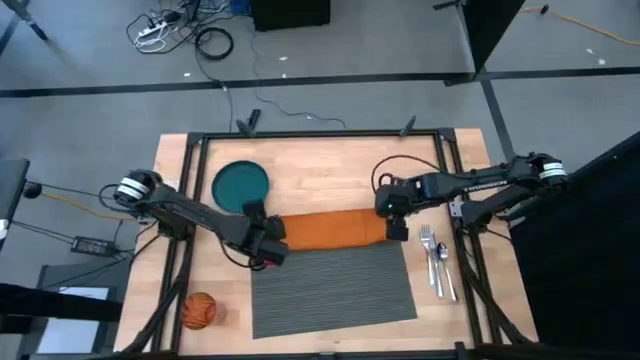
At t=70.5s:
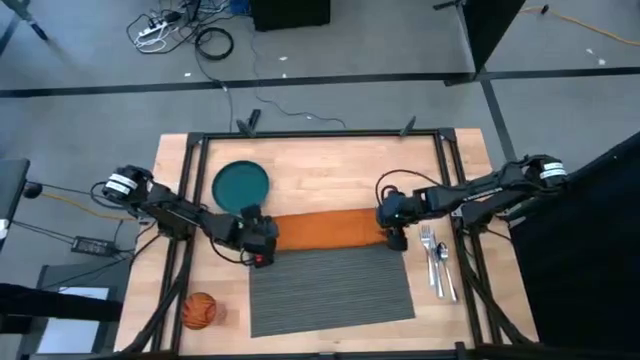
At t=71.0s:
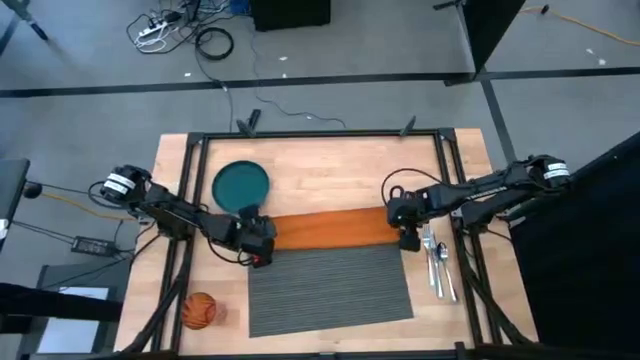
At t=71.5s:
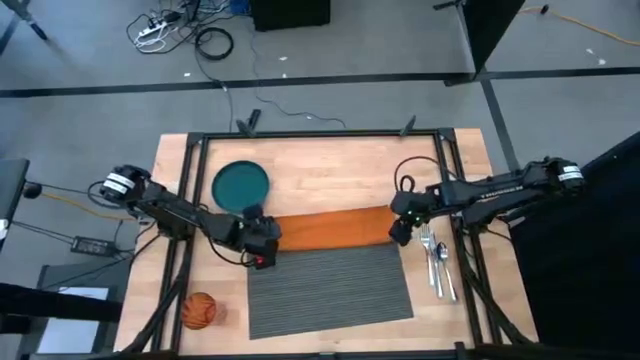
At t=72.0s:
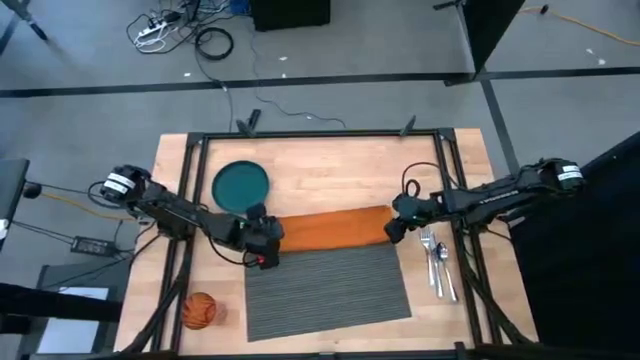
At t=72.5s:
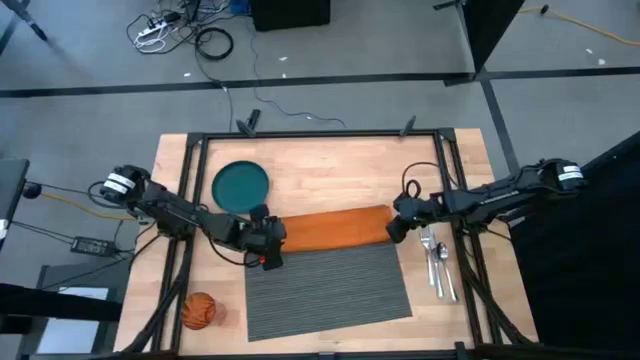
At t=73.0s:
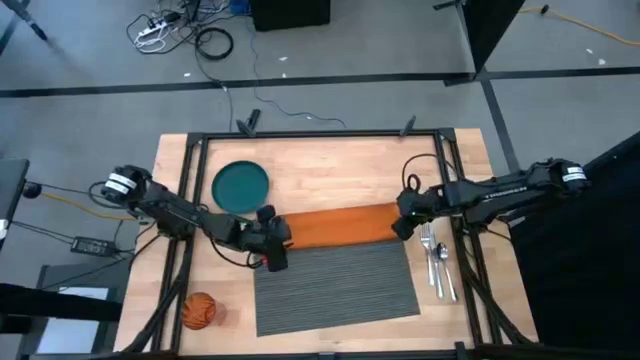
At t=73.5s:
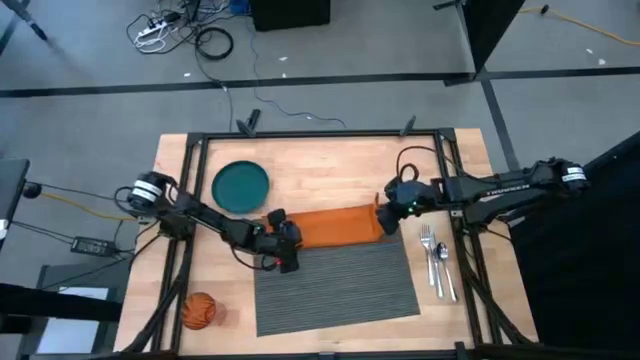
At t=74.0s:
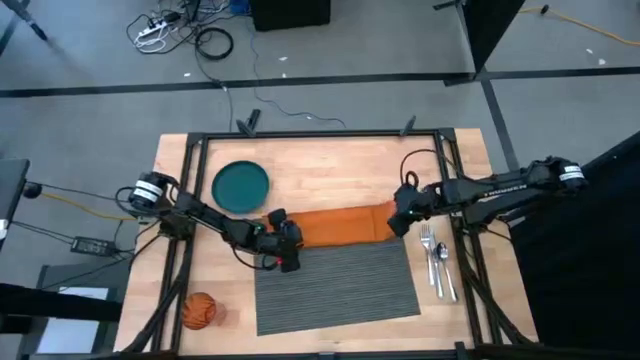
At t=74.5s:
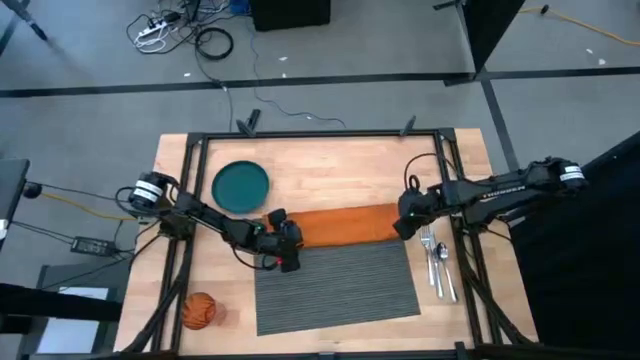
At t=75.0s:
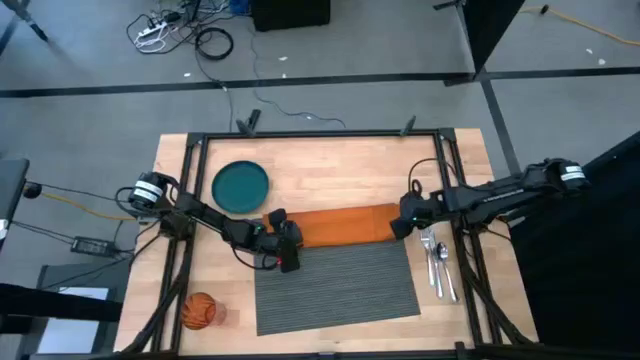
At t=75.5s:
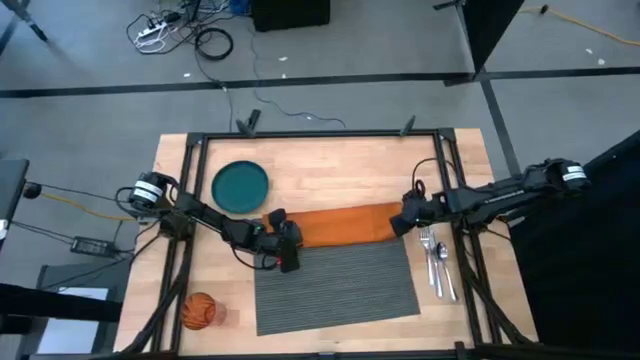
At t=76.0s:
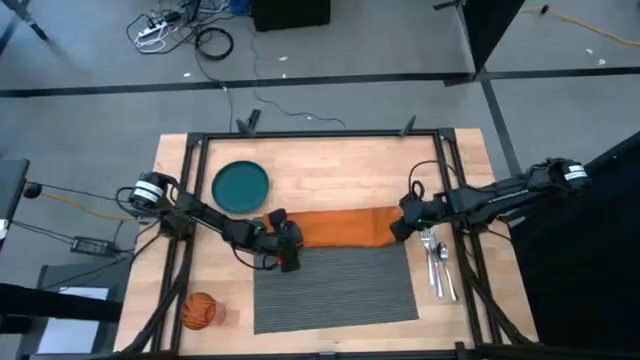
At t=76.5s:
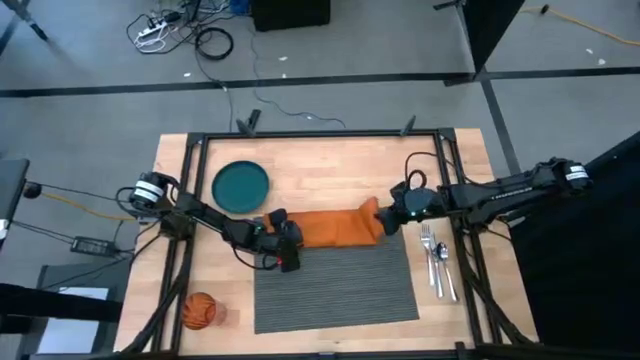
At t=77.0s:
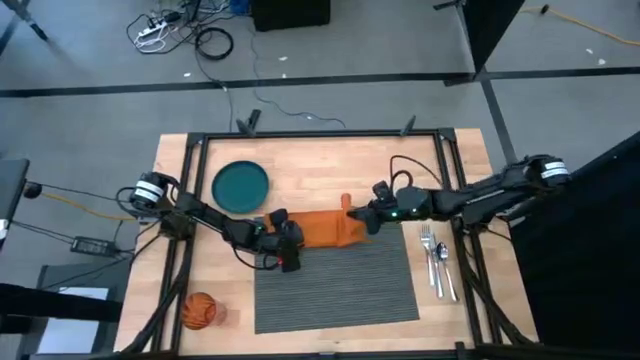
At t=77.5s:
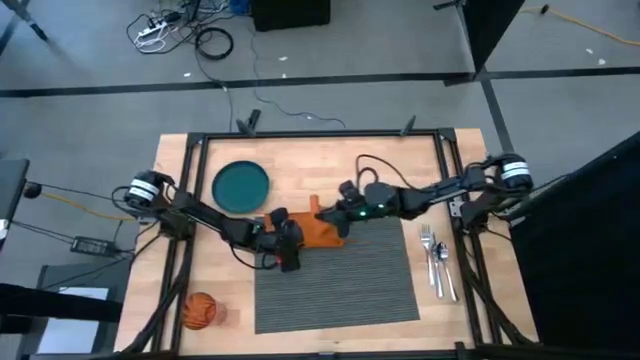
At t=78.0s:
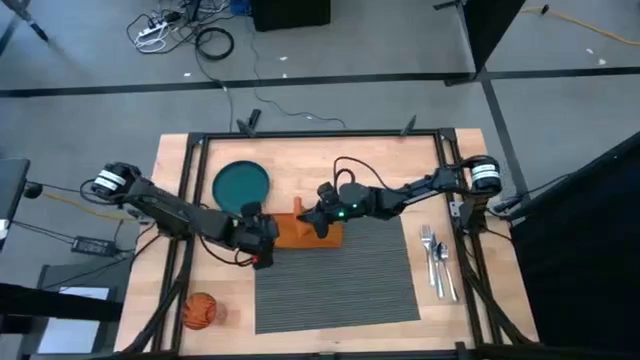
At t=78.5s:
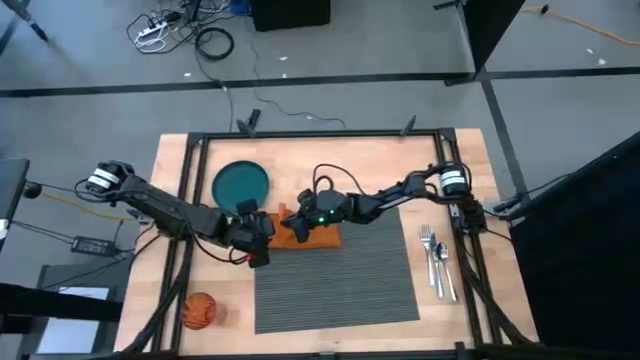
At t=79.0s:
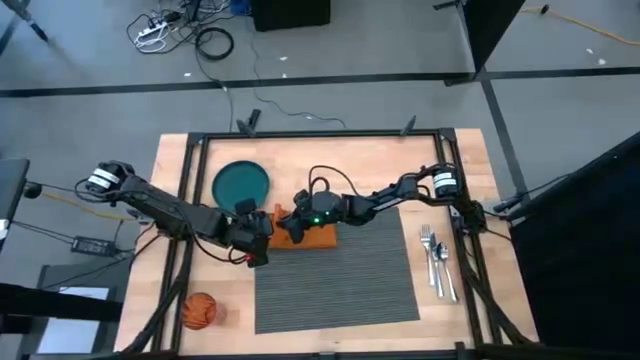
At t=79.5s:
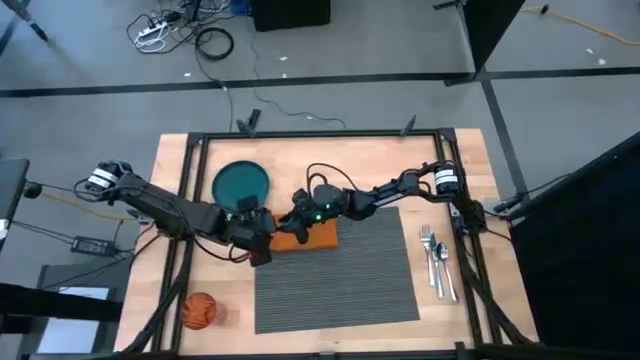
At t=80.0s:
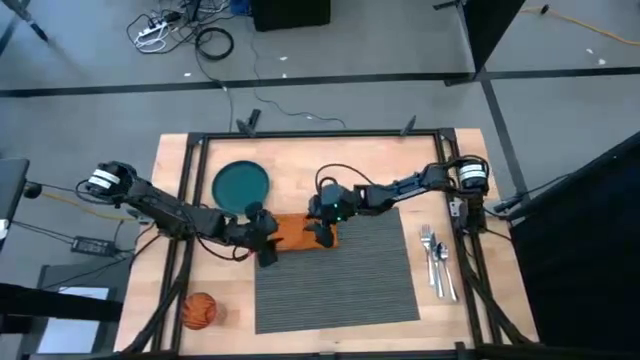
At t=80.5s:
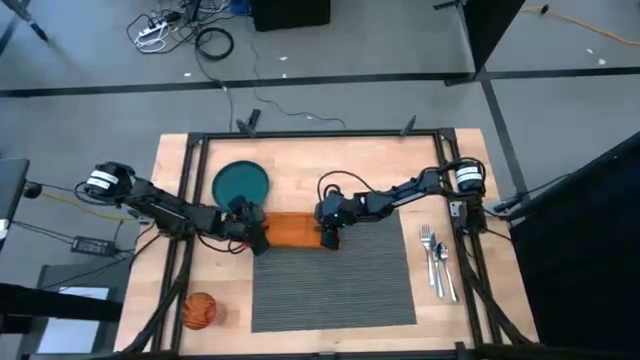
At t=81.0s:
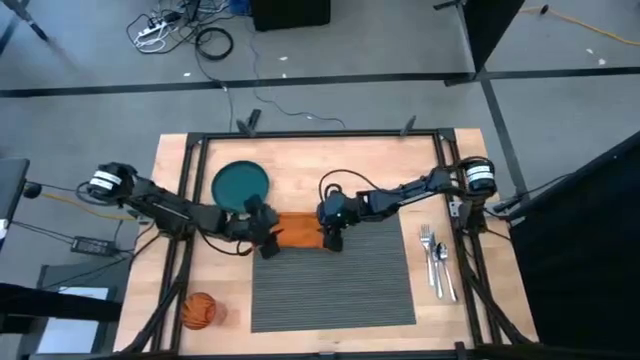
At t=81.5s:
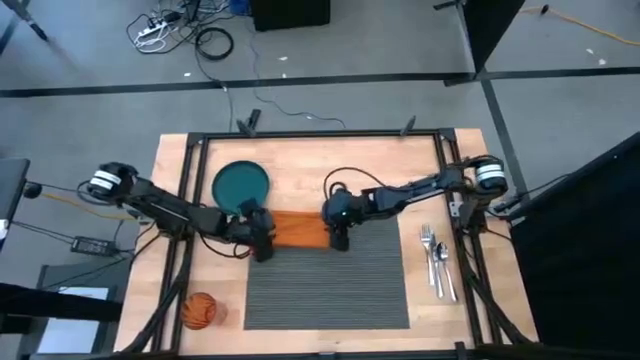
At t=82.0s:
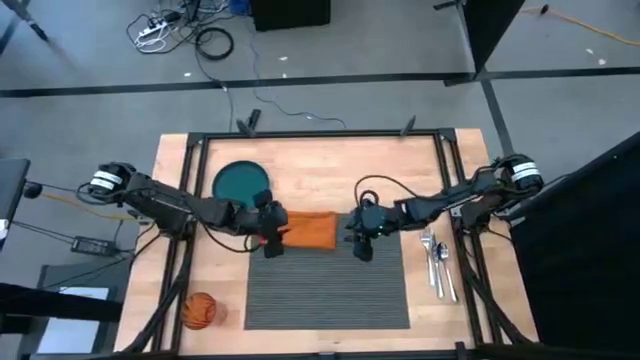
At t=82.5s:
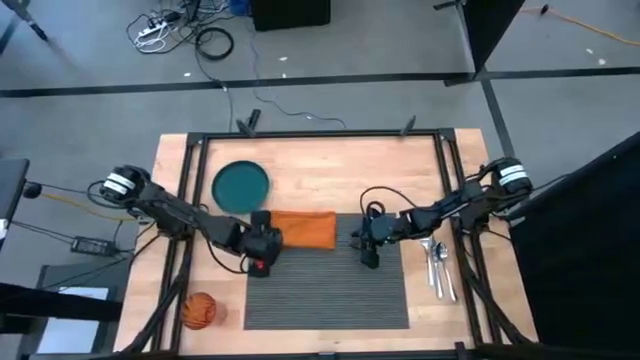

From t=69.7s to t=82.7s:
Task: Set table place
Fold the orange table napkin

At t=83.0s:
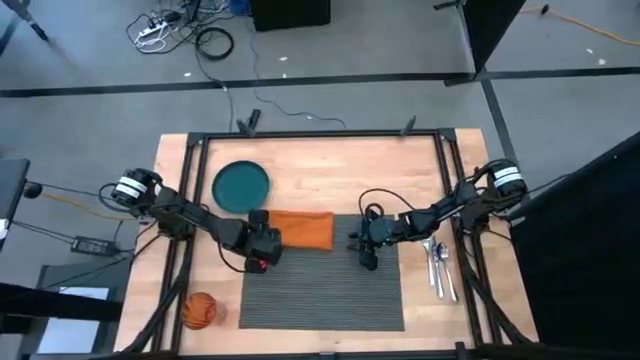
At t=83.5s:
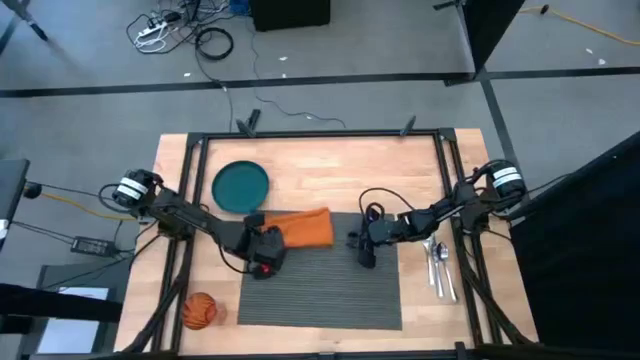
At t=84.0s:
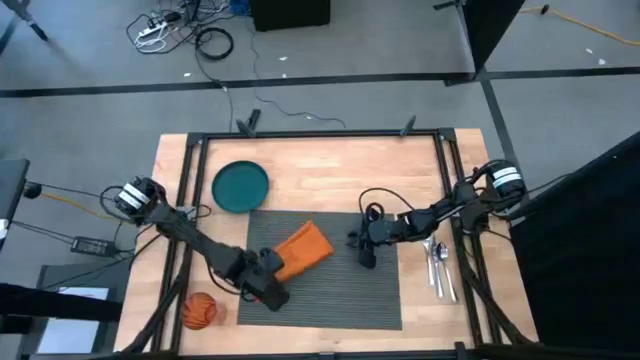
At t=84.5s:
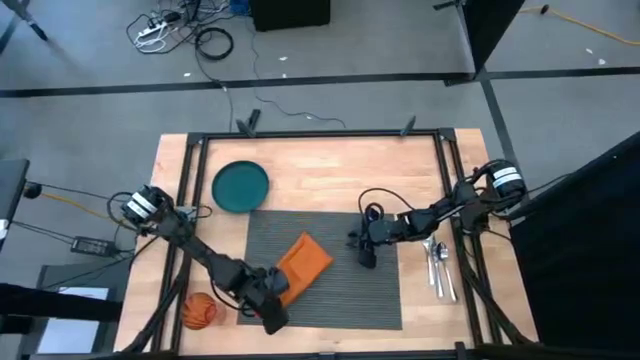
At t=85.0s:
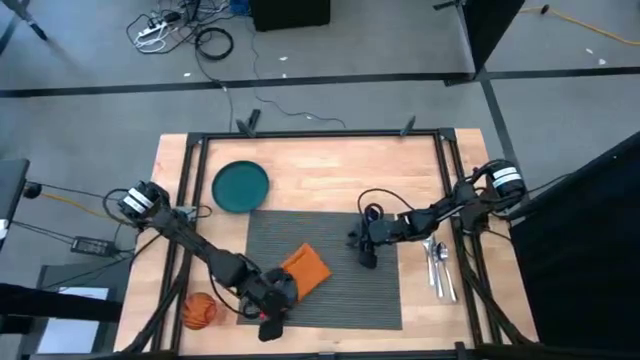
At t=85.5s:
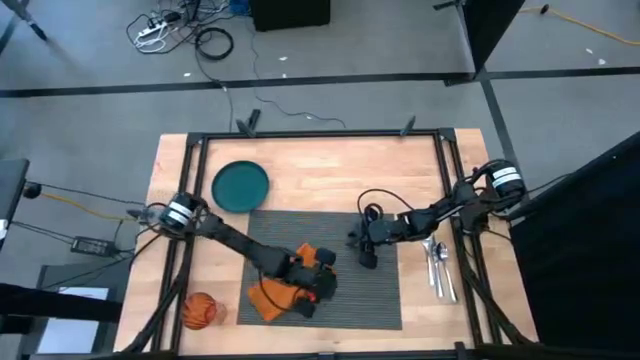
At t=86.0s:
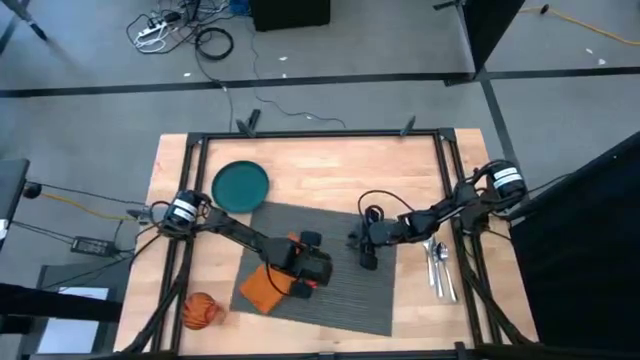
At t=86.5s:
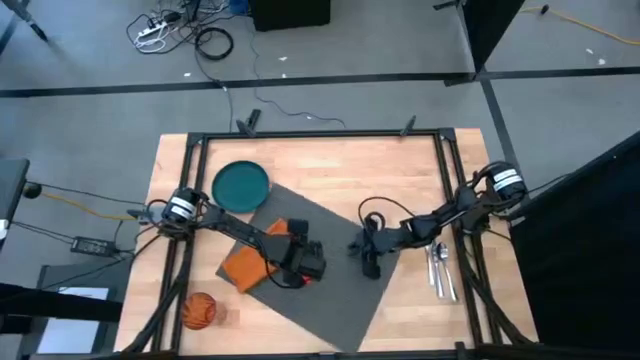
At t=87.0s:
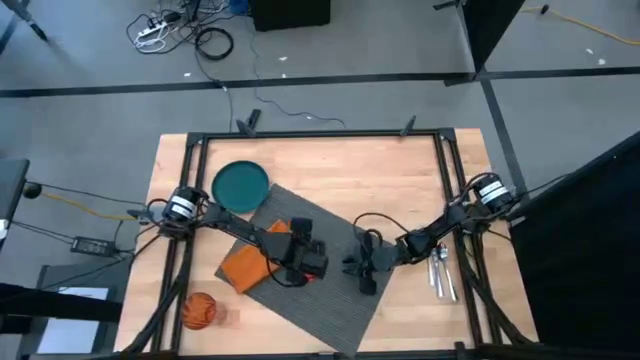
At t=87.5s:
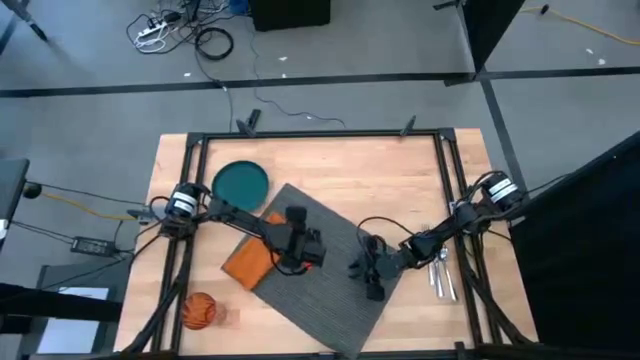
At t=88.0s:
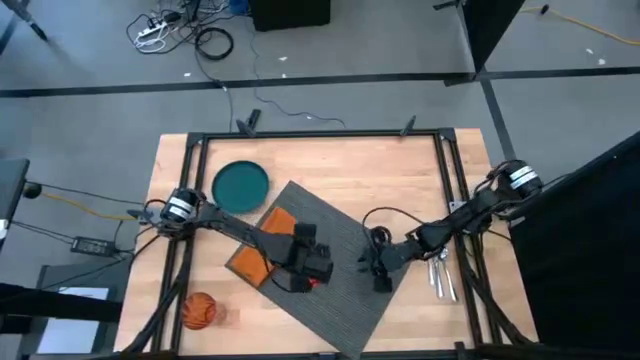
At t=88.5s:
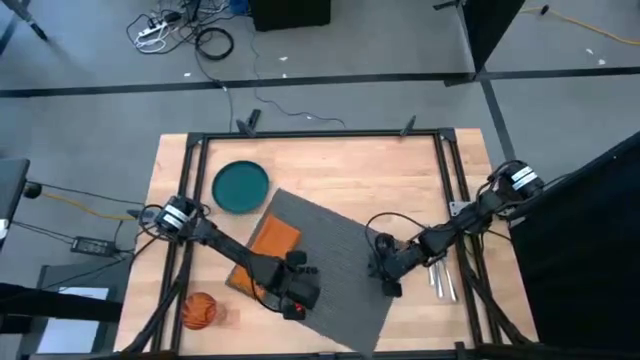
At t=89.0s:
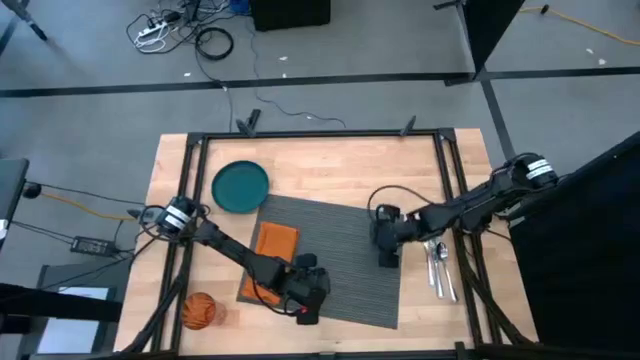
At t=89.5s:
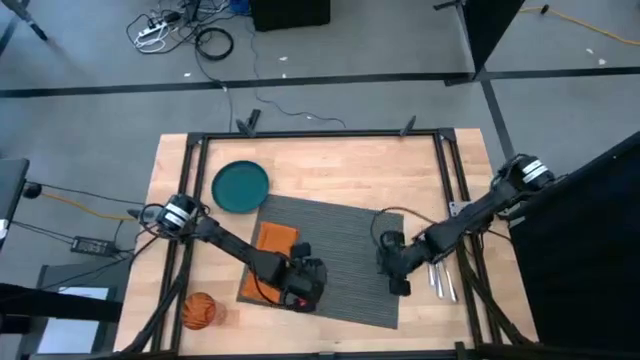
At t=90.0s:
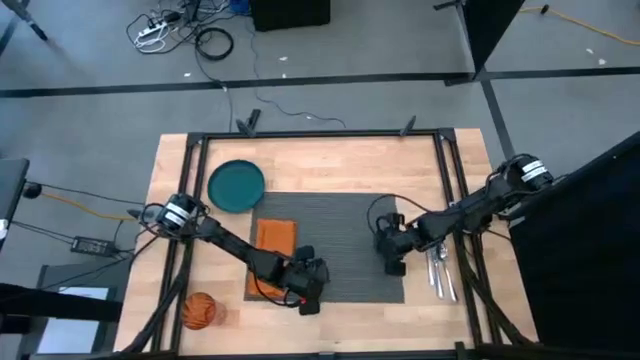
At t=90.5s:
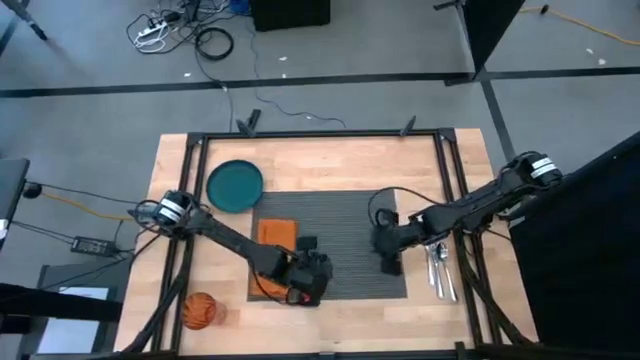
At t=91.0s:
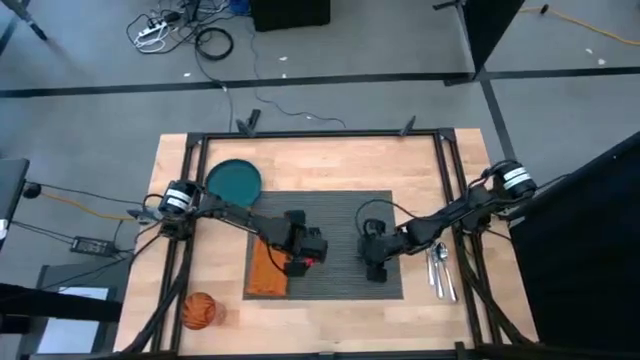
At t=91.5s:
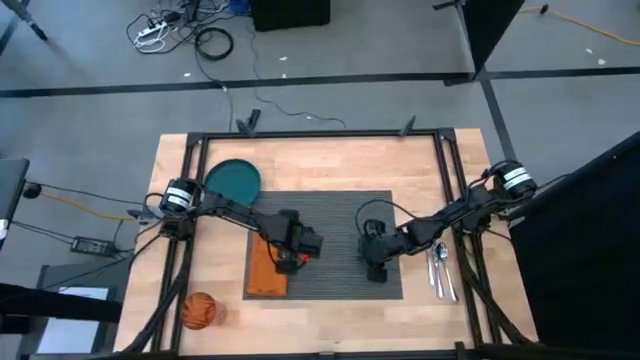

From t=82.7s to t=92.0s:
Move the orange table napkin to the bottom left side of the gray placemat
